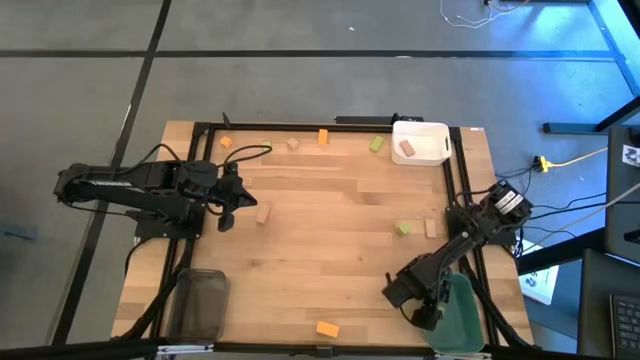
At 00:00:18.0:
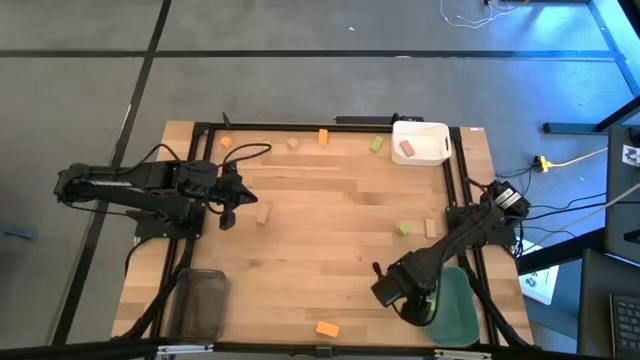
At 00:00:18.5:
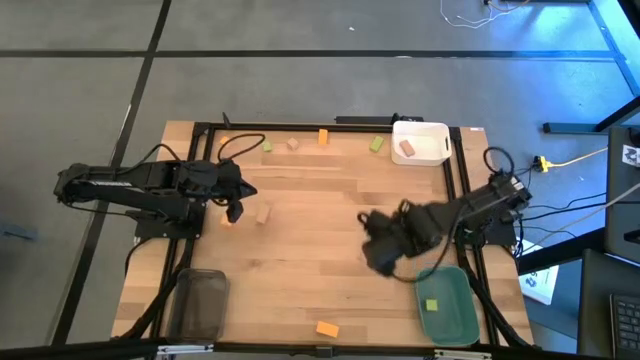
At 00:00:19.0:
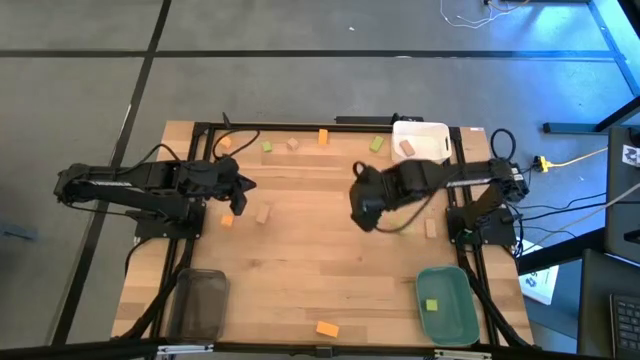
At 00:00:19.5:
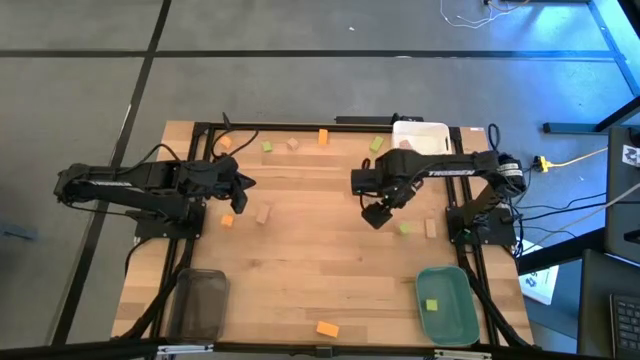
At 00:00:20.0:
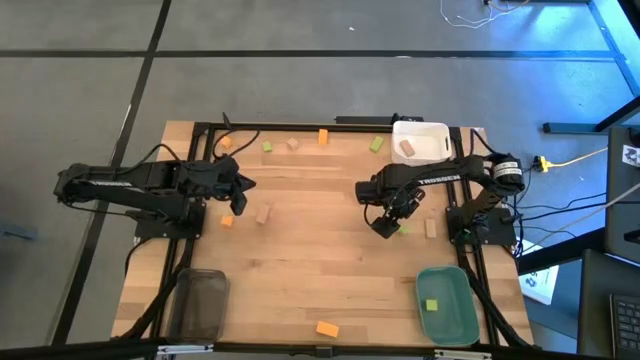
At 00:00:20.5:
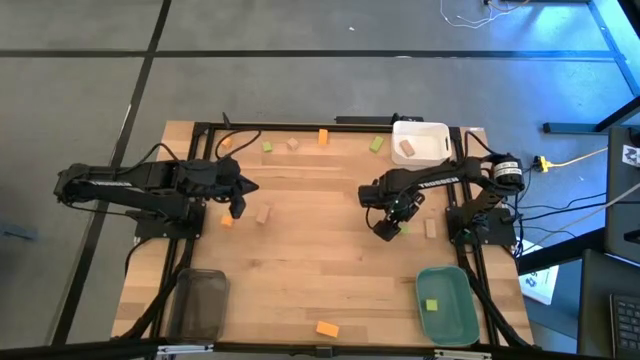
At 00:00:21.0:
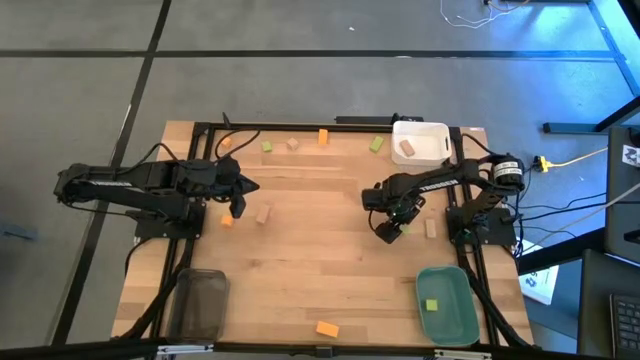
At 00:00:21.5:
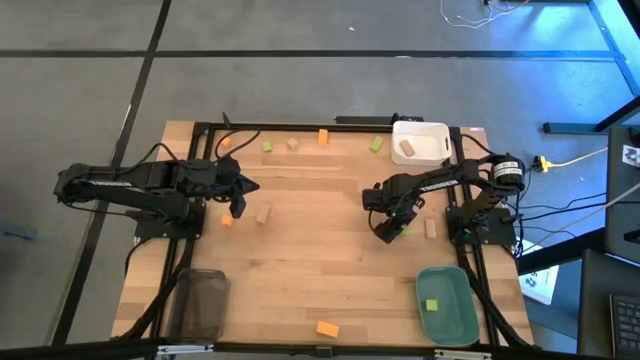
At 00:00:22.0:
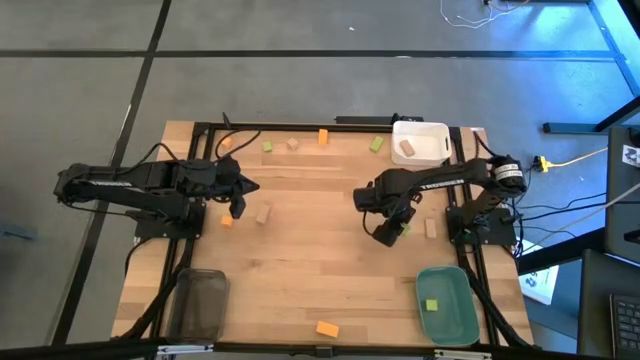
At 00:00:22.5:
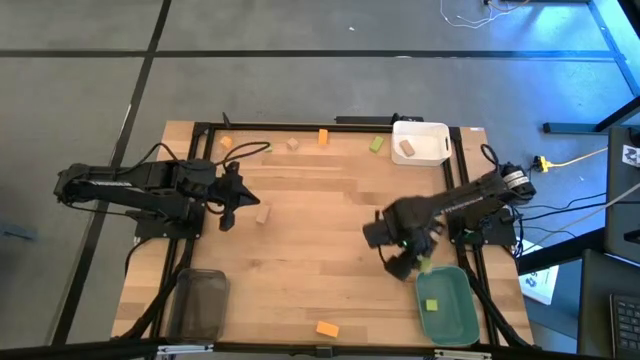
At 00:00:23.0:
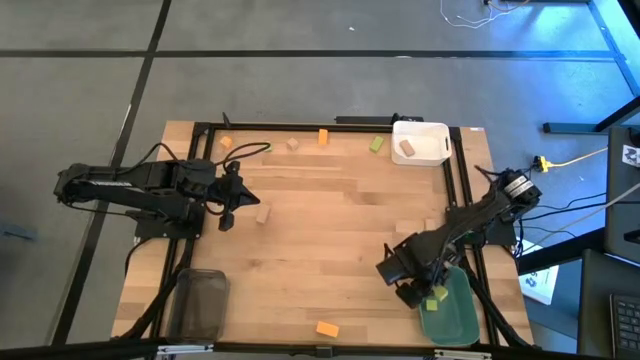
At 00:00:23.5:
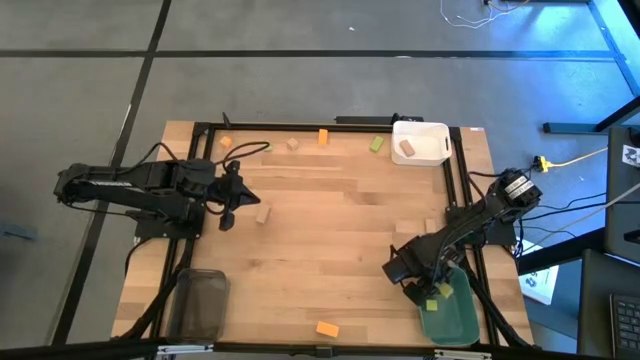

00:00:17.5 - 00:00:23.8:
Task: Sort & place blocks by color
Put the bottom green block into the blue bin

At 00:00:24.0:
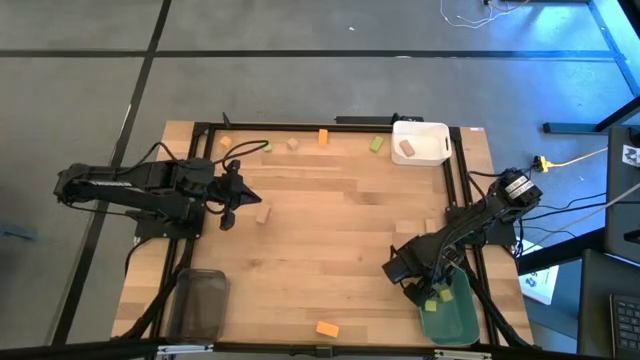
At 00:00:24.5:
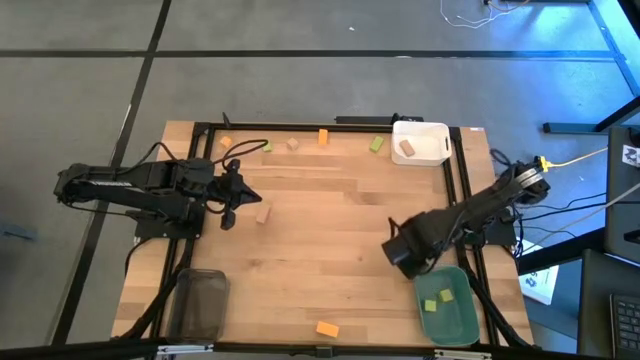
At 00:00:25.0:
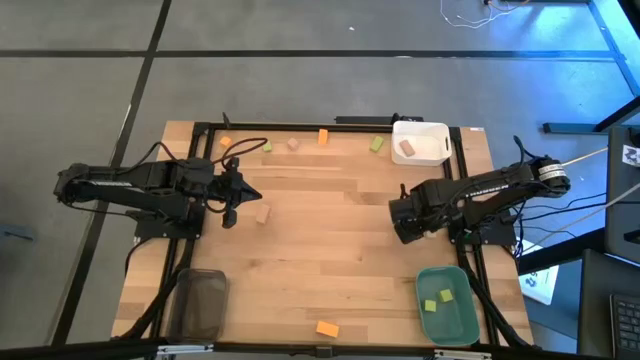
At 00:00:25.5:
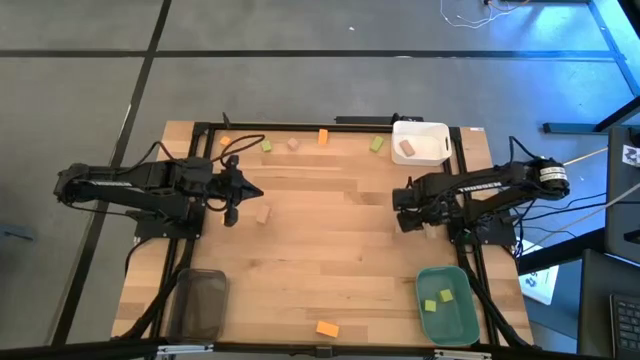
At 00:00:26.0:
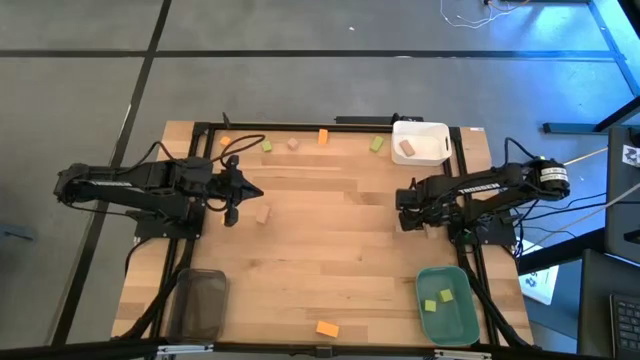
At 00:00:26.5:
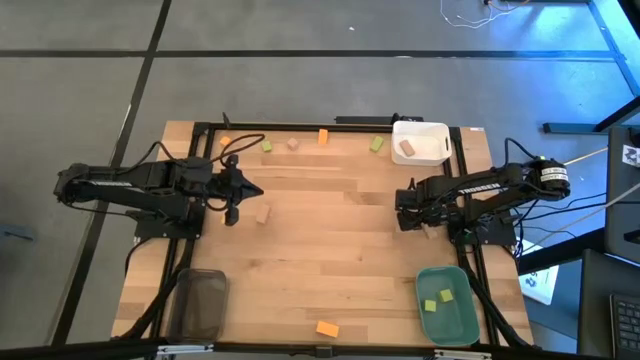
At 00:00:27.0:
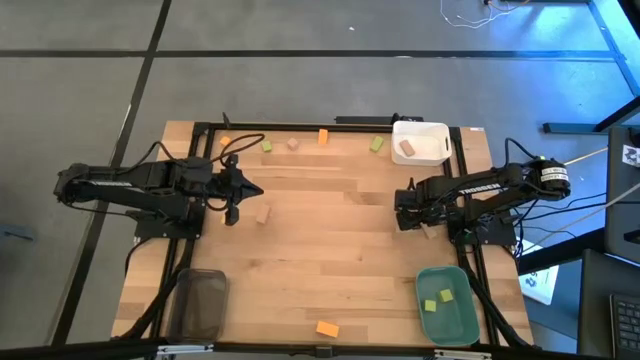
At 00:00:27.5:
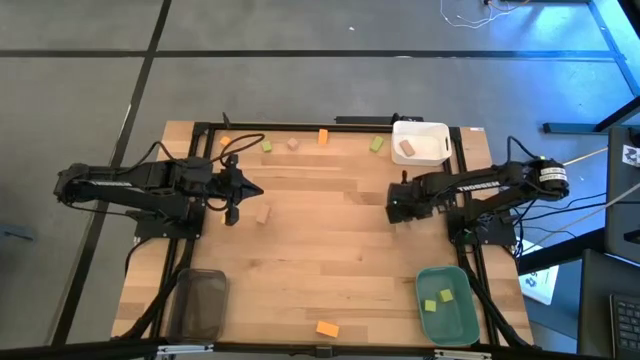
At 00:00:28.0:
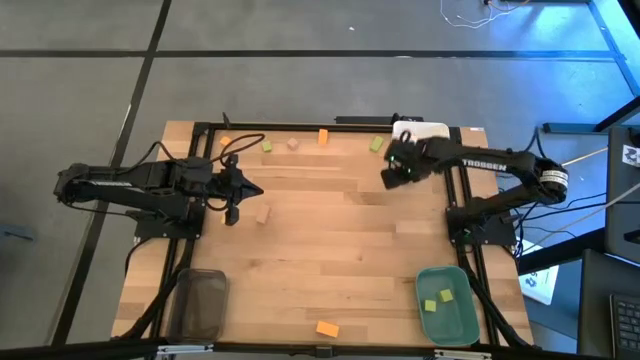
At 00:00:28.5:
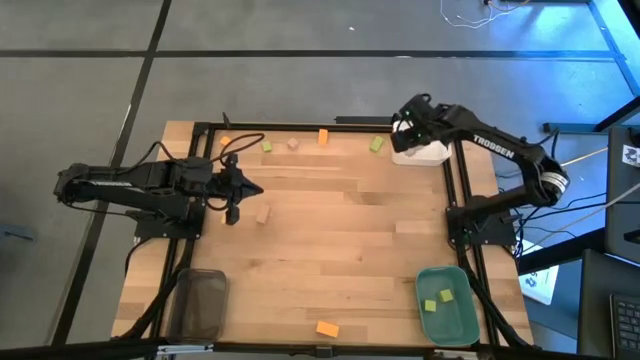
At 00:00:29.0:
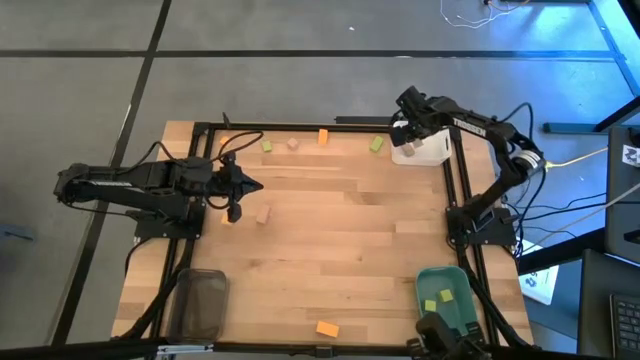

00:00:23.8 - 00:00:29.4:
Put the bottom right brown block into the white bin

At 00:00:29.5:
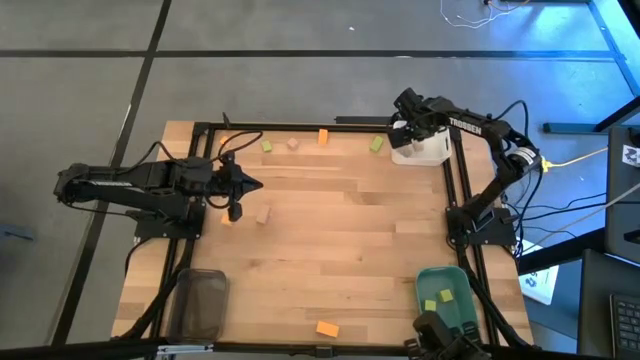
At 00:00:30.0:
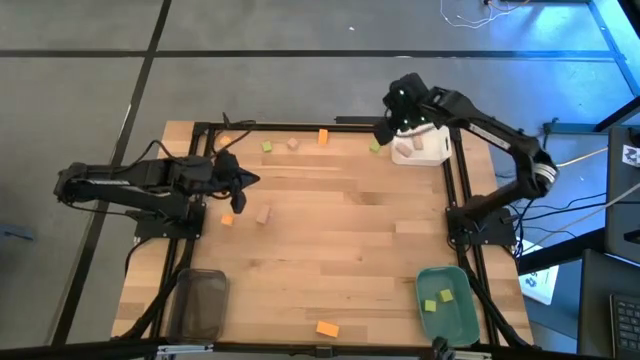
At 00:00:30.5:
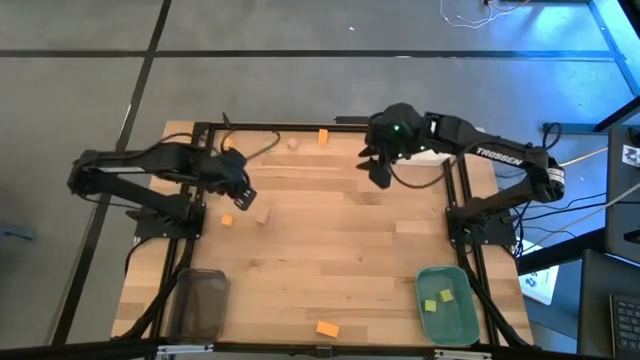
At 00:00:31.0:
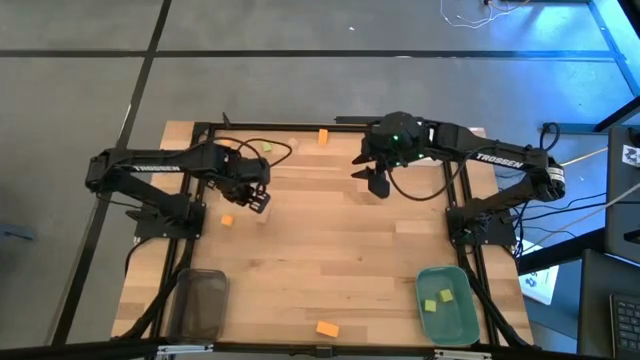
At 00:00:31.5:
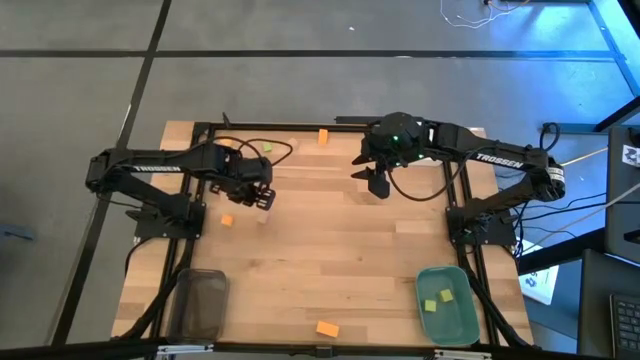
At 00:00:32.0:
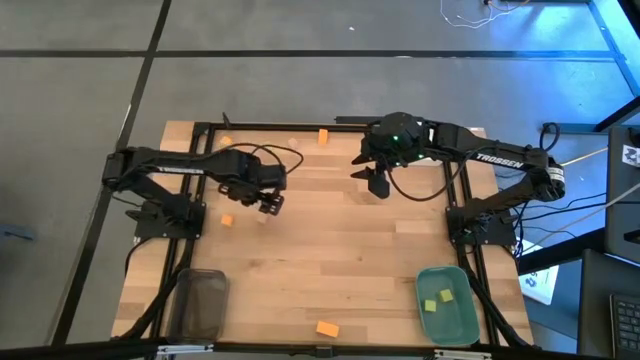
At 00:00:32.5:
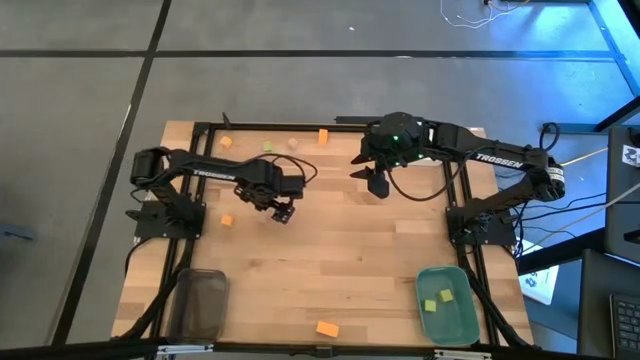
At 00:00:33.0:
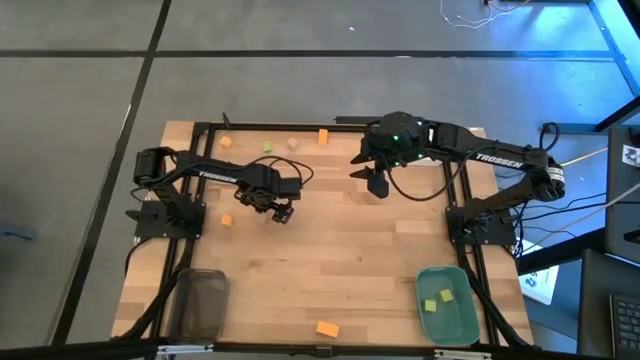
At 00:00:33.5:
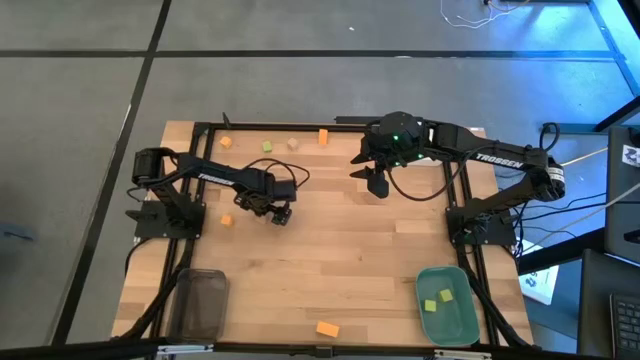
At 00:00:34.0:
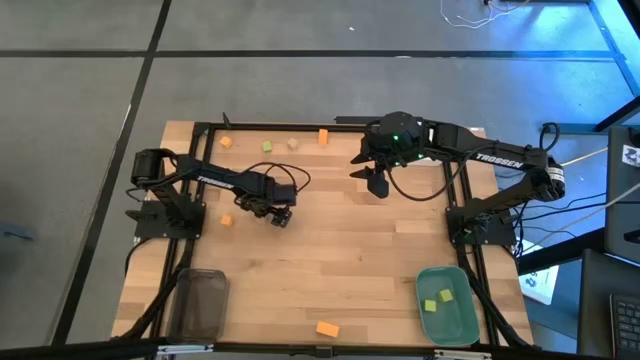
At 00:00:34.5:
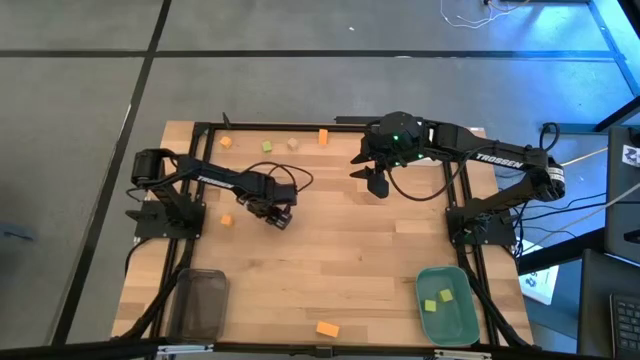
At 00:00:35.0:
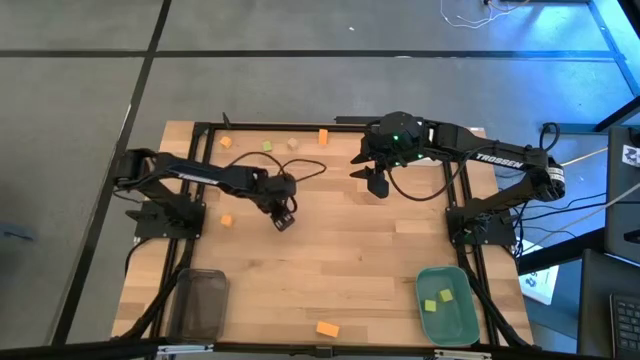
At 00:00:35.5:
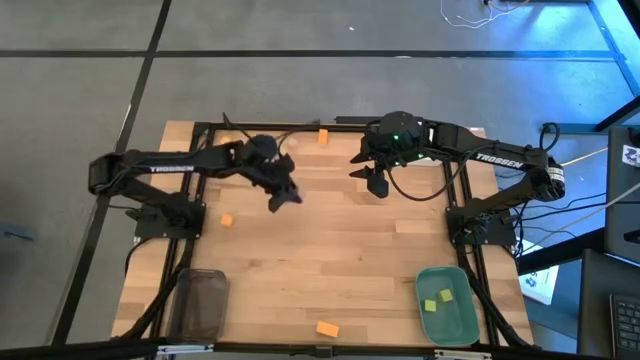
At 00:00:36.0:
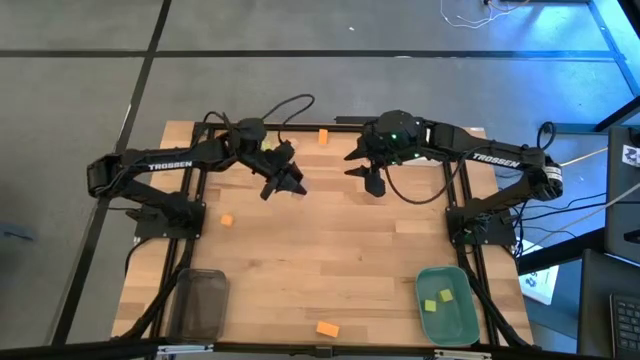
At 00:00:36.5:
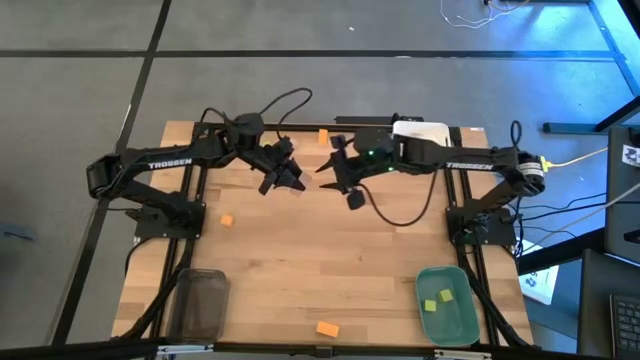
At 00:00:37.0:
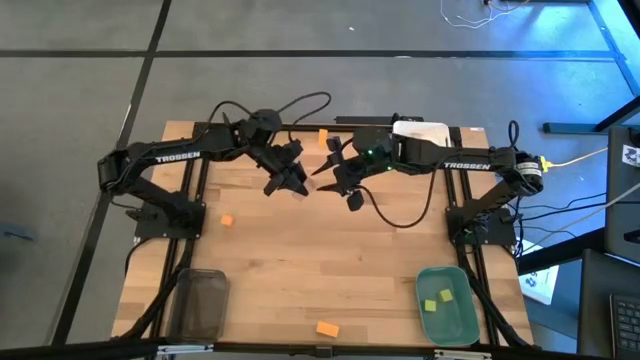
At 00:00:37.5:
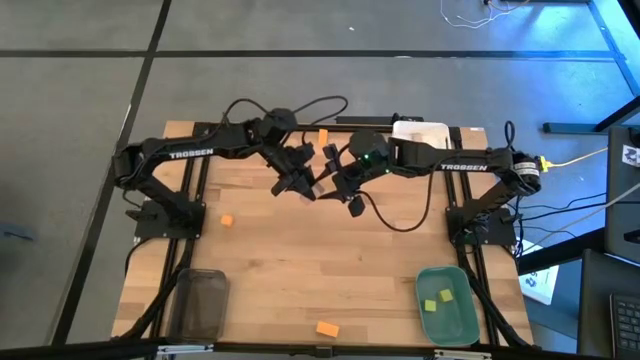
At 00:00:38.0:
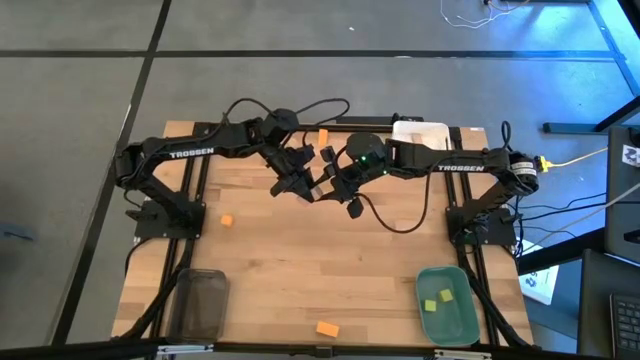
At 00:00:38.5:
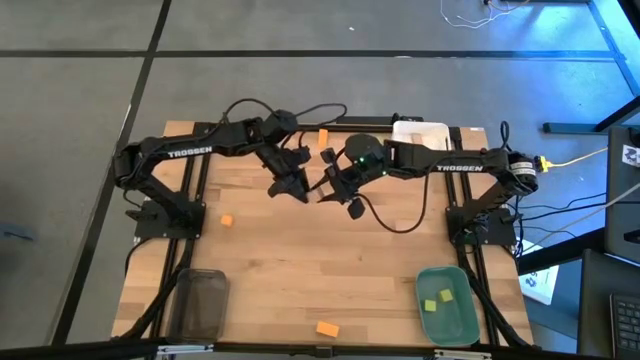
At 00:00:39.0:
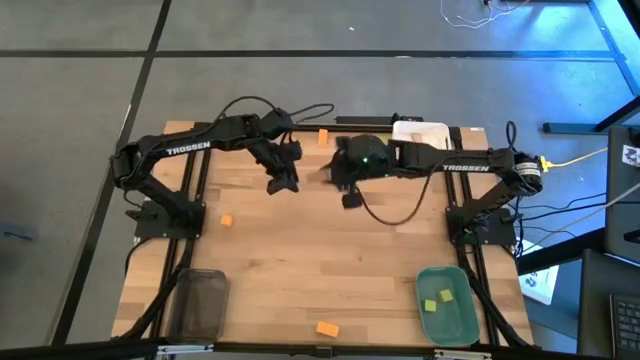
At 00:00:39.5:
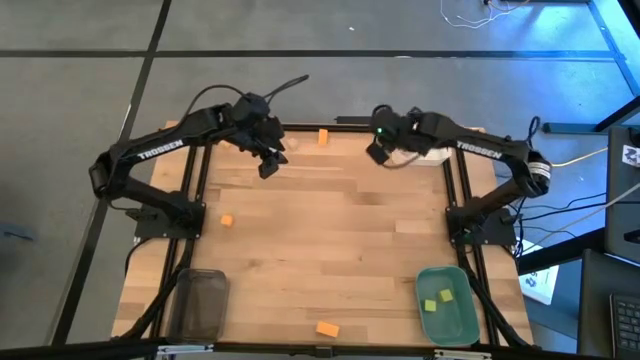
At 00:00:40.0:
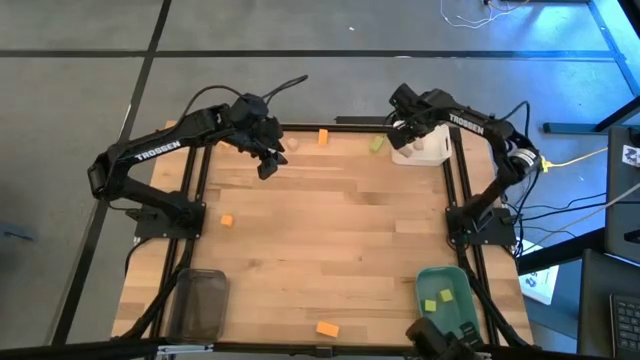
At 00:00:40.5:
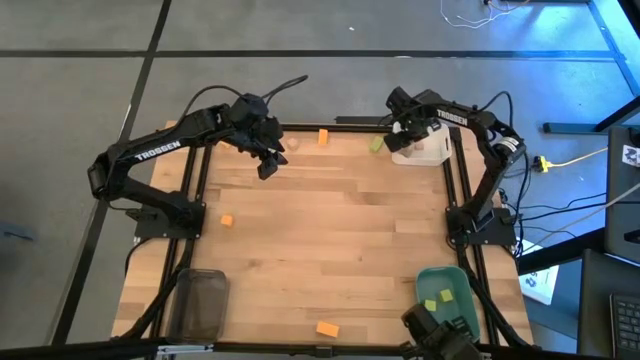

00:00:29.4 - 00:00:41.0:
Put the bottom brown block into the white bin
